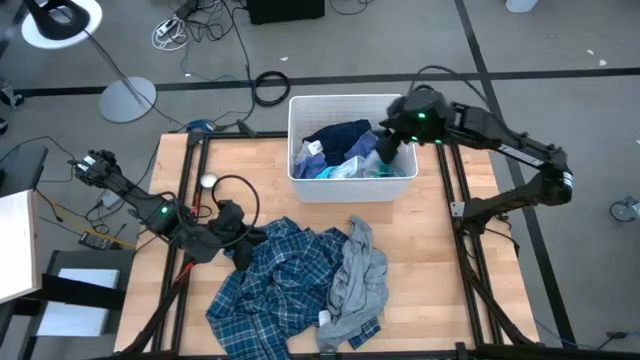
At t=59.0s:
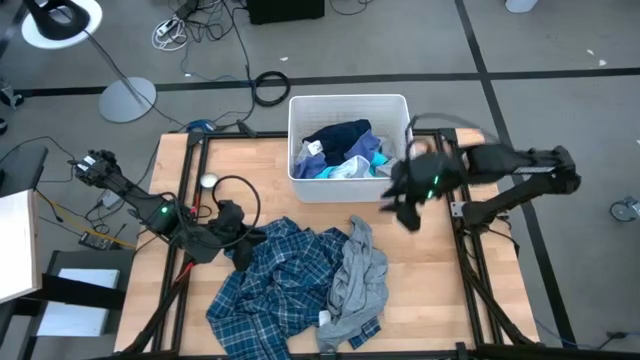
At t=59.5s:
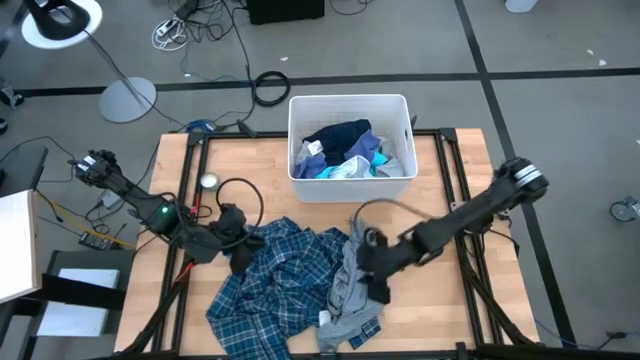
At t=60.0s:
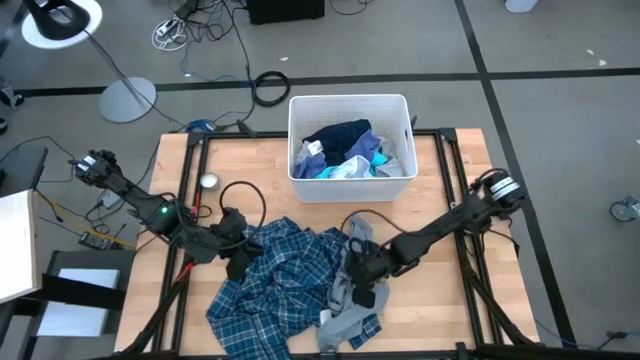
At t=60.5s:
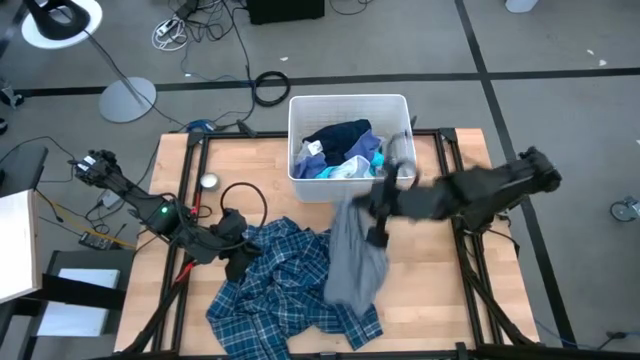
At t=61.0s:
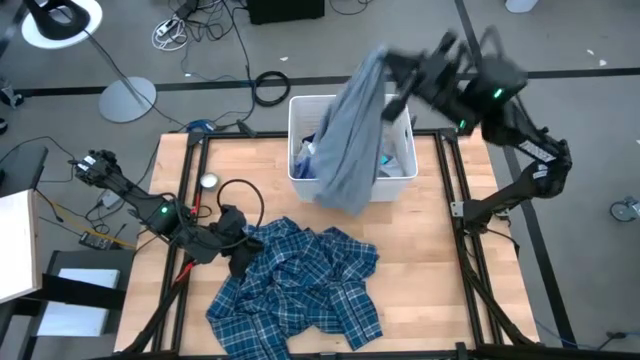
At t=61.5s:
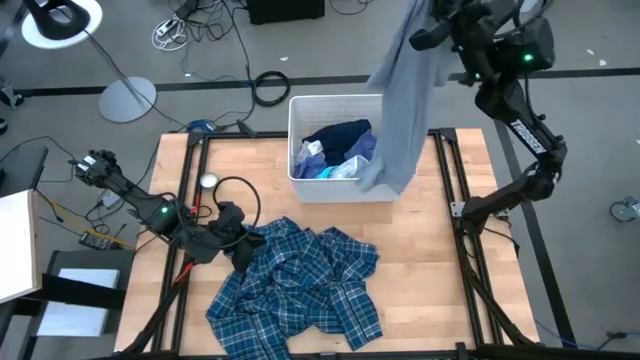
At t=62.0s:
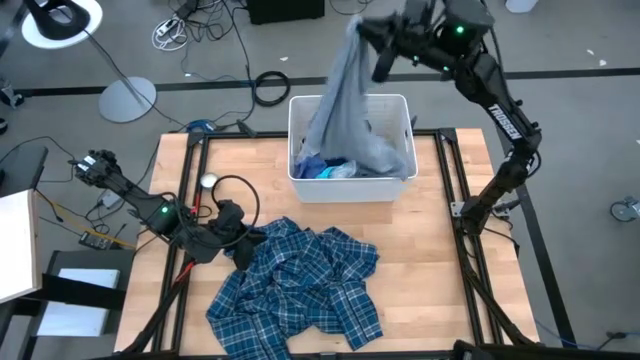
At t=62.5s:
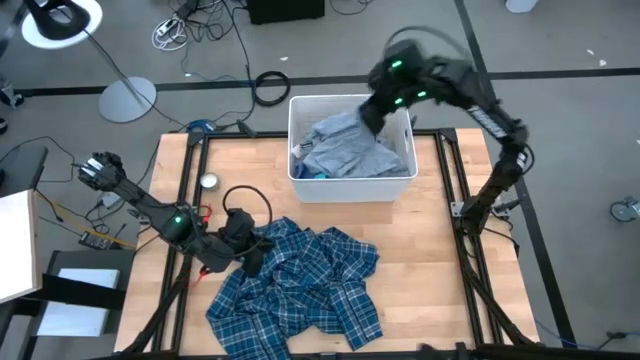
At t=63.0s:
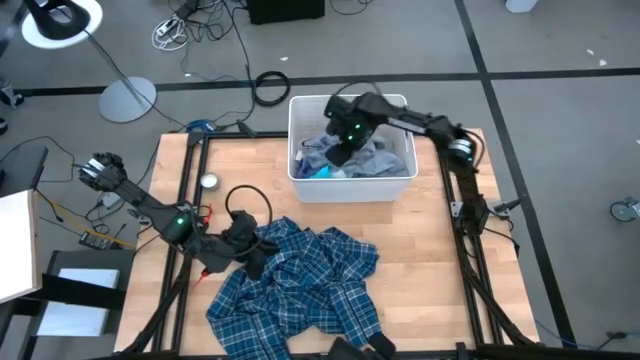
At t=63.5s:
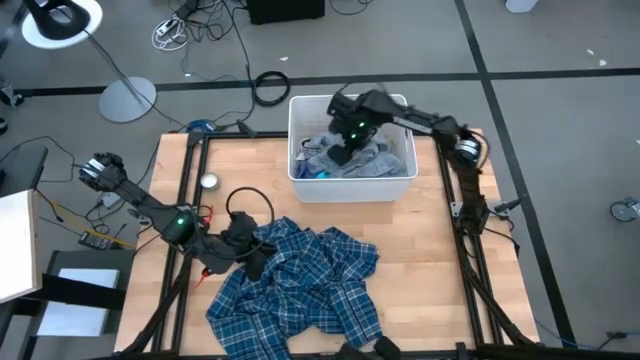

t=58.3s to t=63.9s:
Task: Sort clothes
Put the gray shirt into the white laundry bin

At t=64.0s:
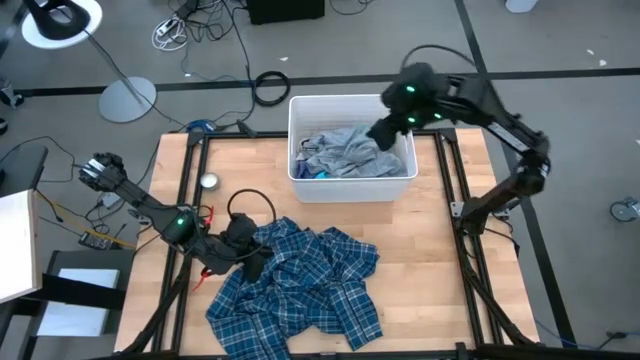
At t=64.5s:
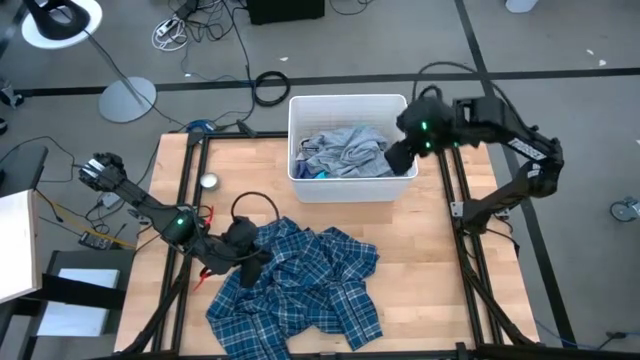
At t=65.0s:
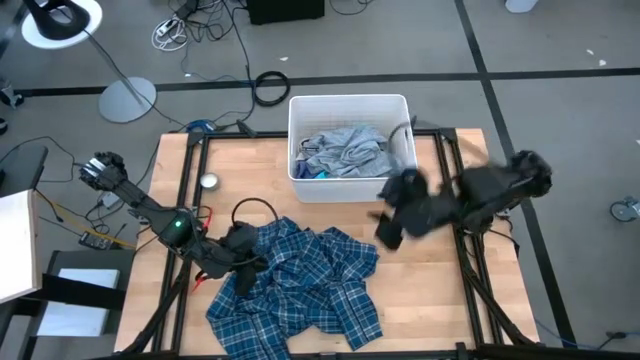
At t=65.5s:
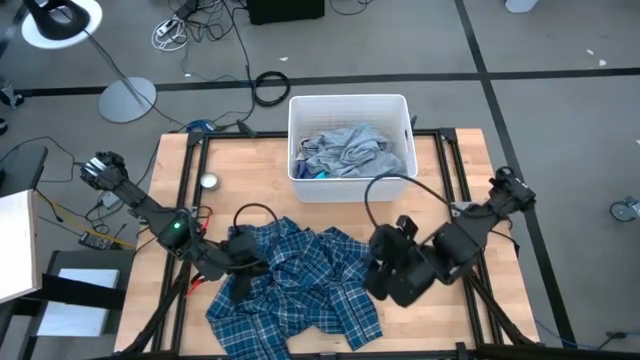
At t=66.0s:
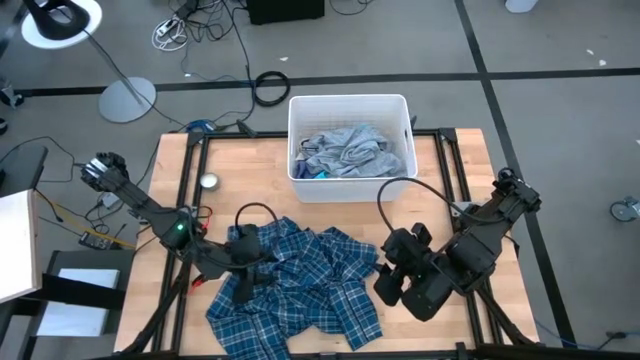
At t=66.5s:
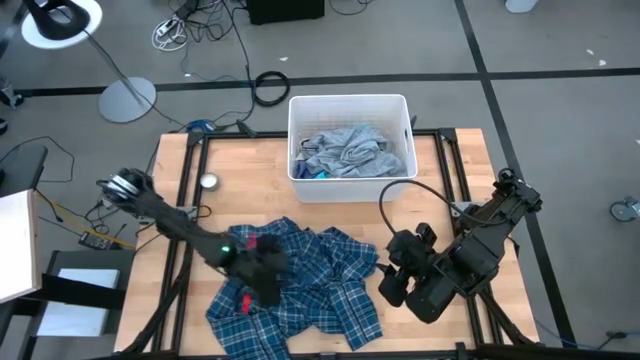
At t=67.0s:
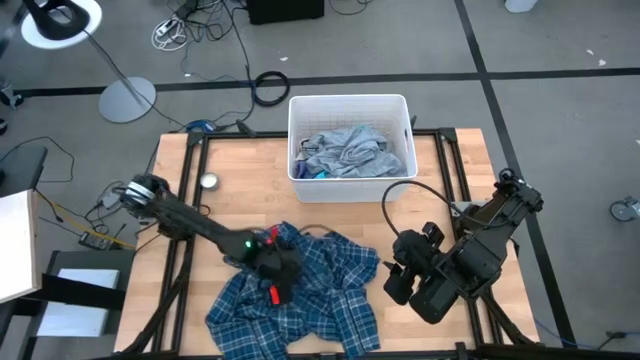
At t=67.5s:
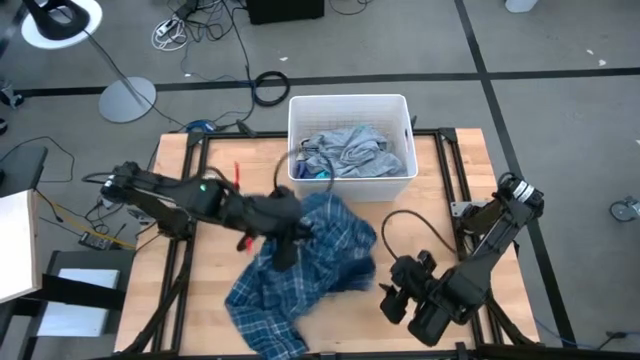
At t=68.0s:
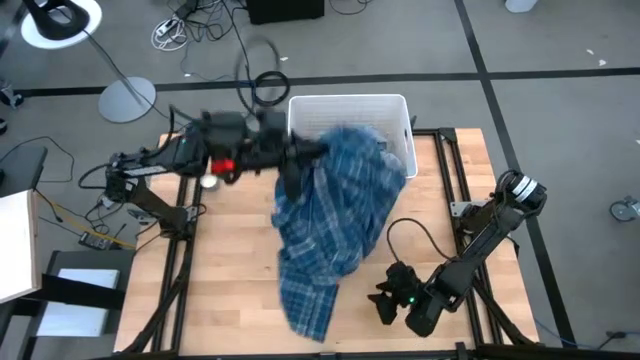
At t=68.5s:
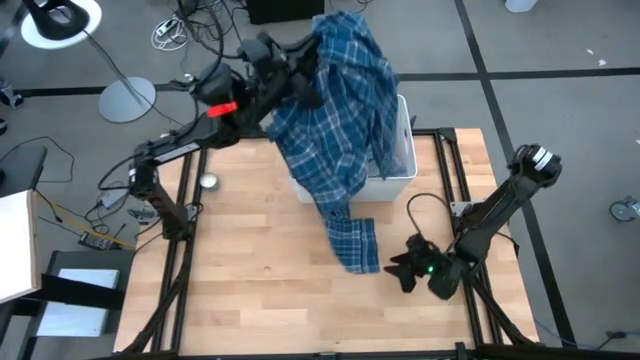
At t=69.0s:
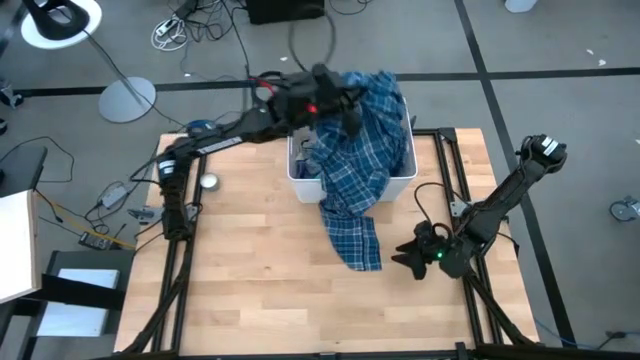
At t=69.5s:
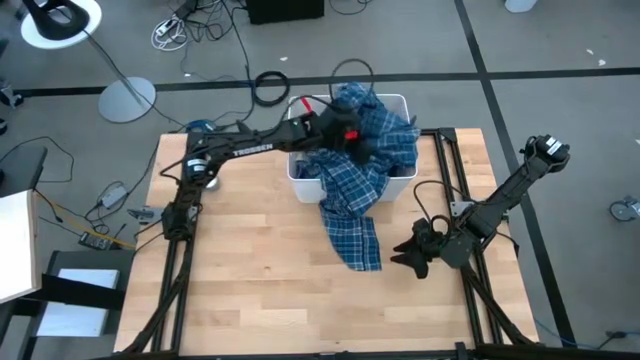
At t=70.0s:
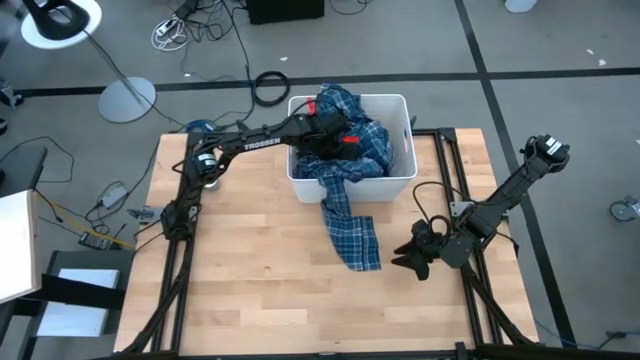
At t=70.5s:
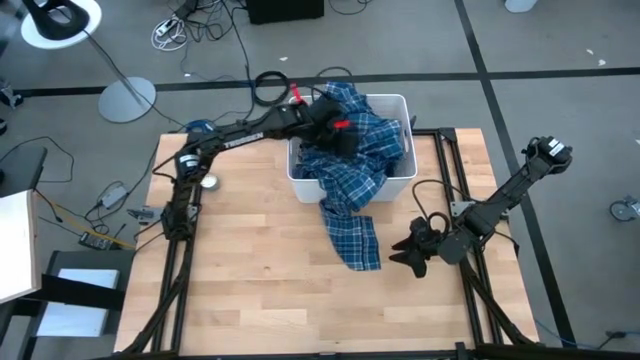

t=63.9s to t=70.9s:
Put the blue long sleeve polo into the white laundry bin

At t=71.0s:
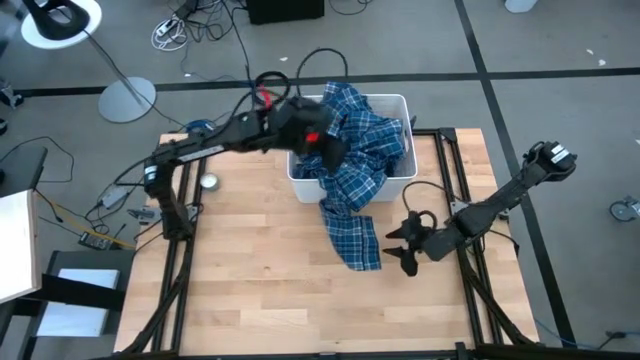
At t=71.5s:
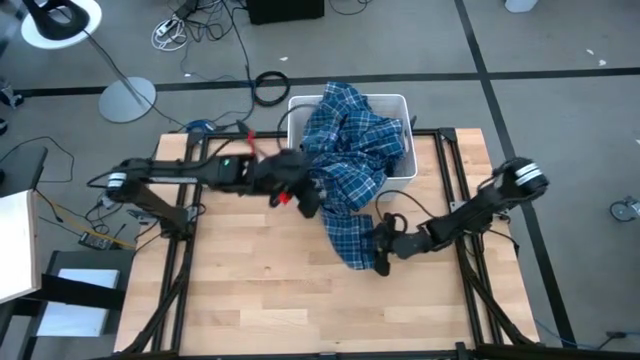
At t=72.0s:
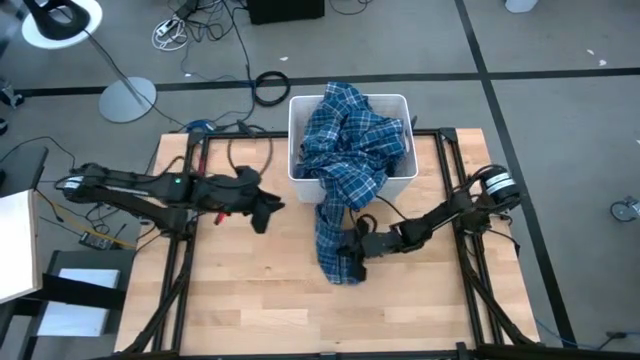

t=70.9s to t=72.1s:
Put the blue long sleeve polo into the white laundry bin

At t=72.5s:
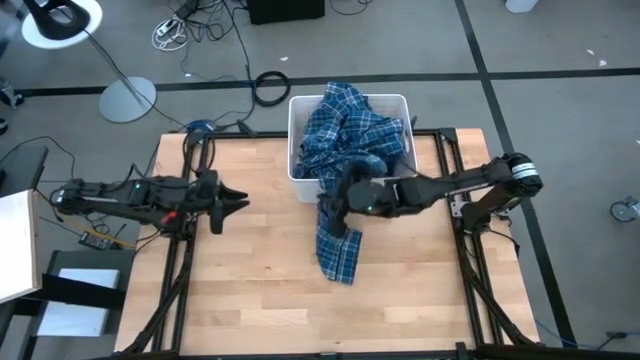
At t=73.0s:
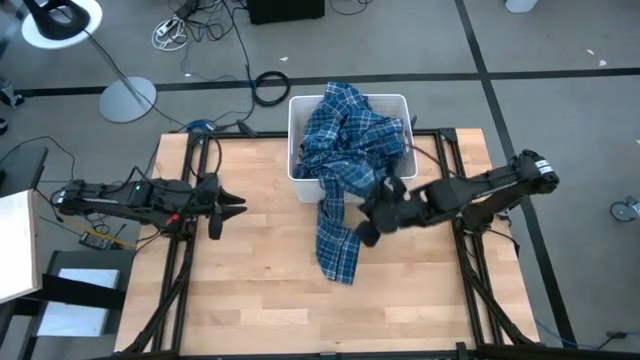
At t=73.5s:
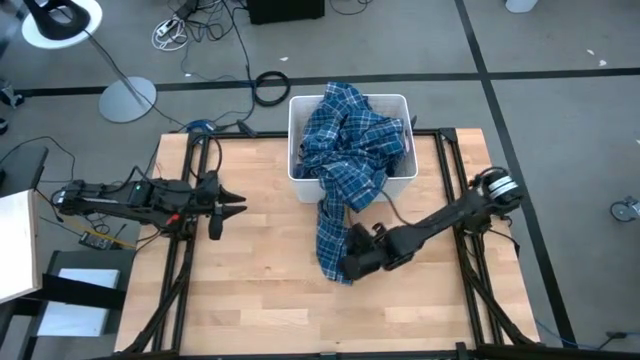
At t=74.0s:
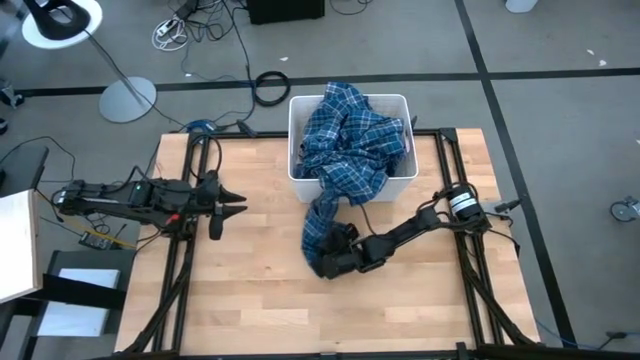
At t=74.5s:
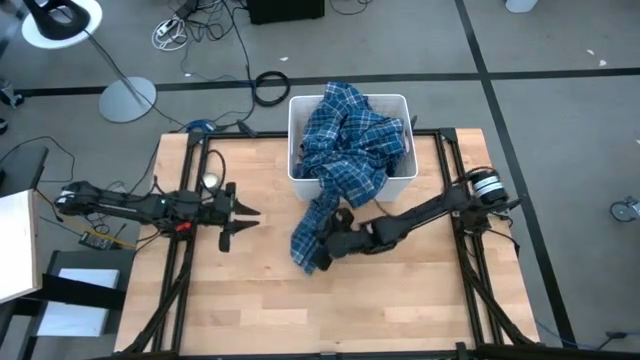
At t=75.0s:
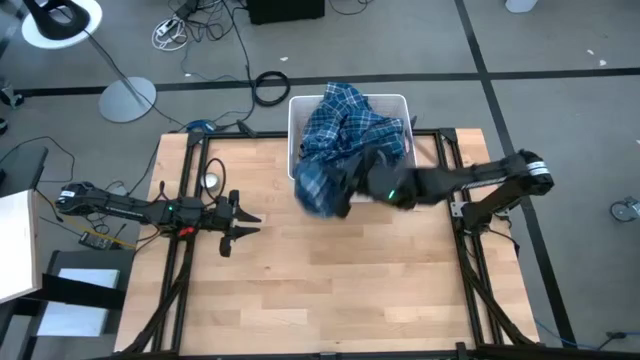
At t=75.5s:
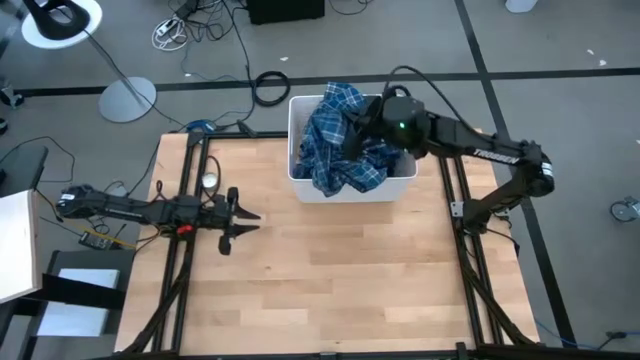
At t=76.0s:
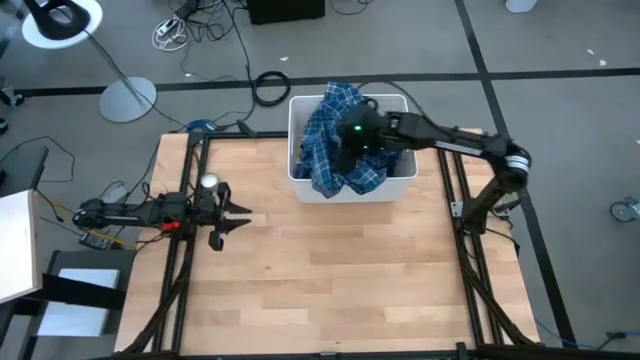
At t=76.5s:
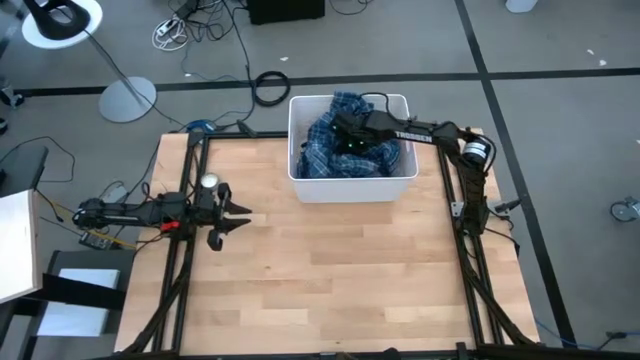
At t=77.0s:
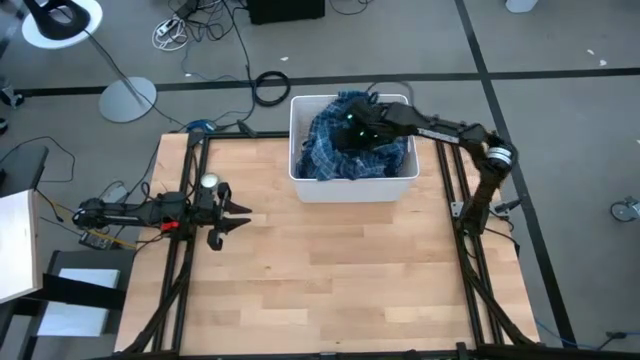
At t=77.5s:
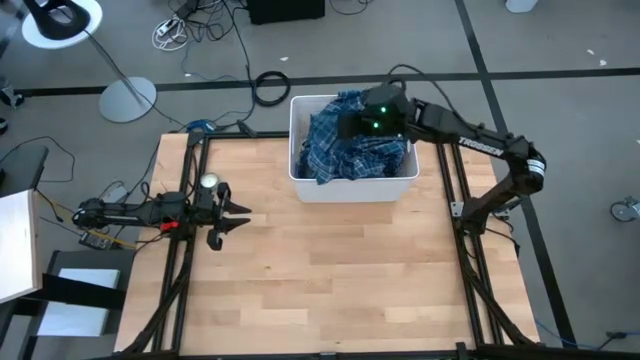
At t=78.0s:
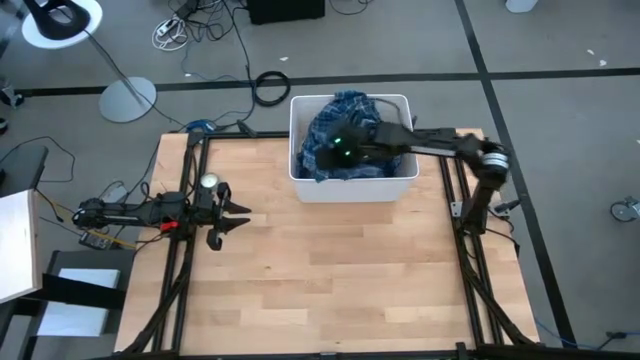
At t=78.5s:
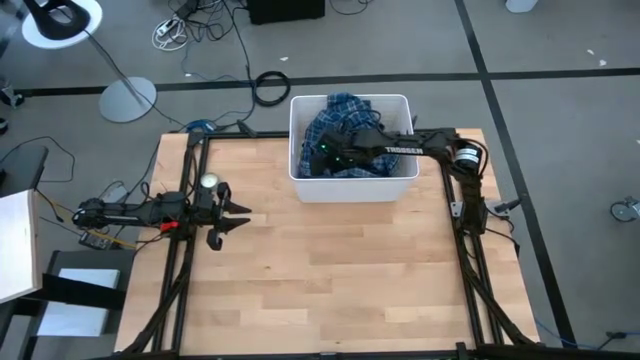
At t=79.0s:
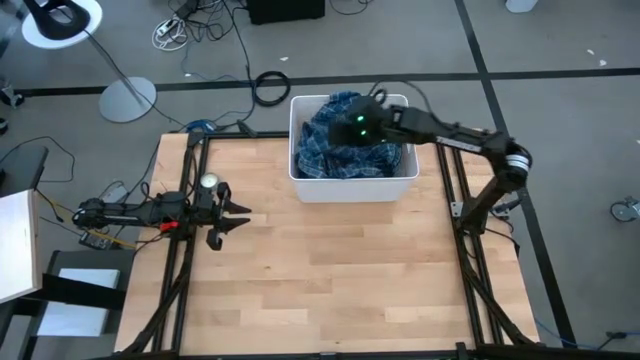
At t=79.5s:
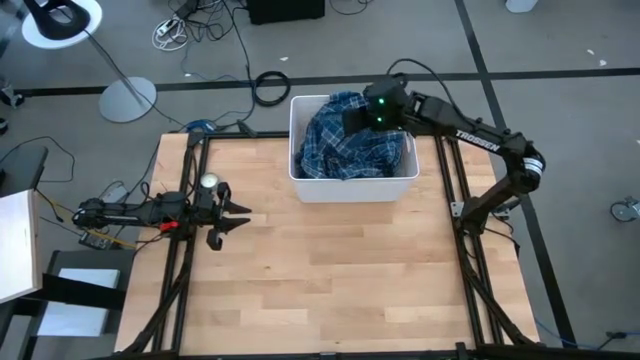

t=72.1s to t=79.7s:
Put the blue long sleeve polo into the white laundry bin
